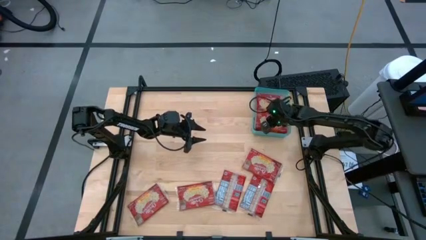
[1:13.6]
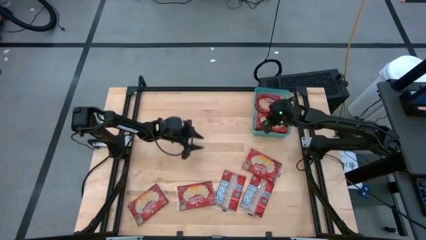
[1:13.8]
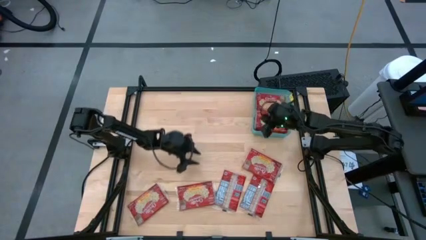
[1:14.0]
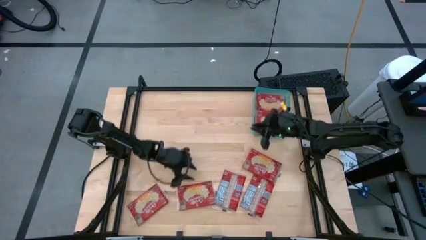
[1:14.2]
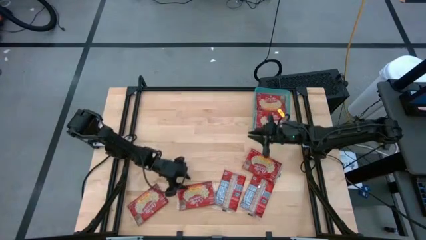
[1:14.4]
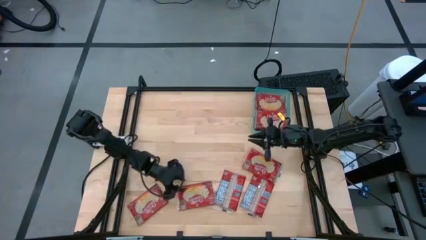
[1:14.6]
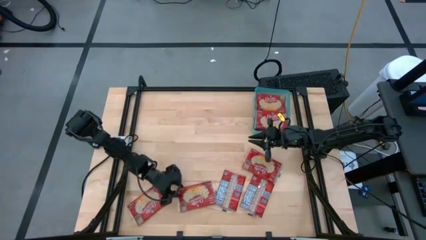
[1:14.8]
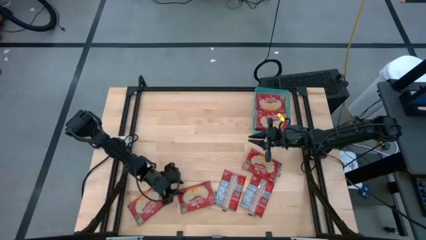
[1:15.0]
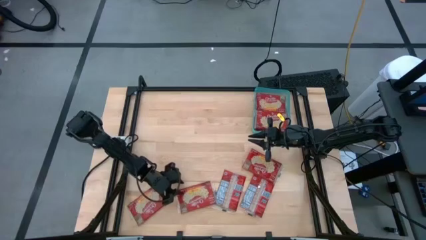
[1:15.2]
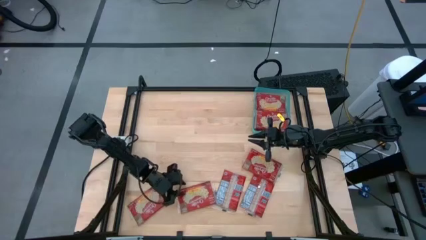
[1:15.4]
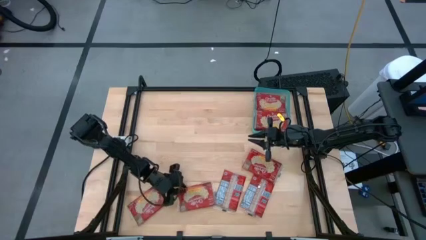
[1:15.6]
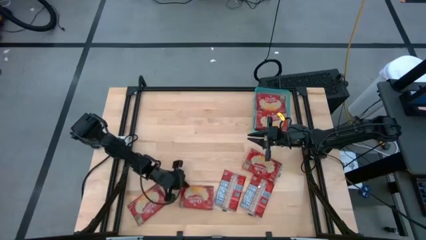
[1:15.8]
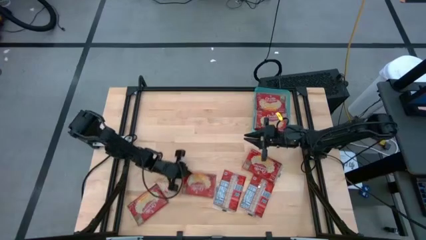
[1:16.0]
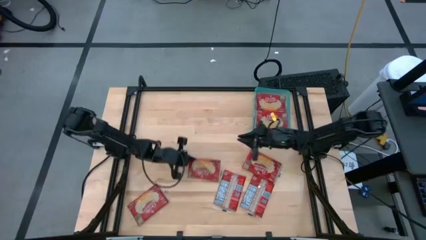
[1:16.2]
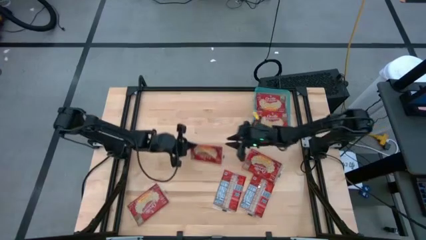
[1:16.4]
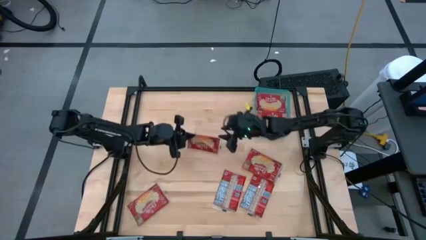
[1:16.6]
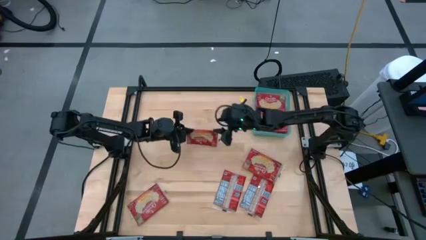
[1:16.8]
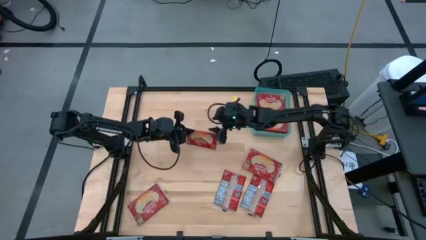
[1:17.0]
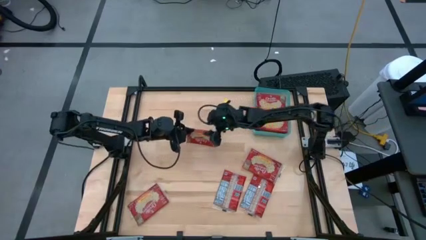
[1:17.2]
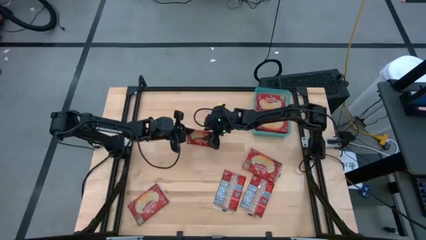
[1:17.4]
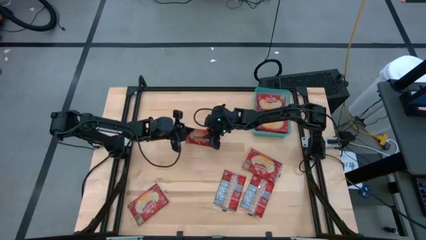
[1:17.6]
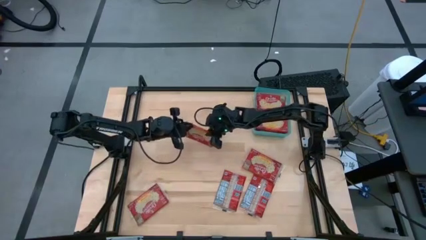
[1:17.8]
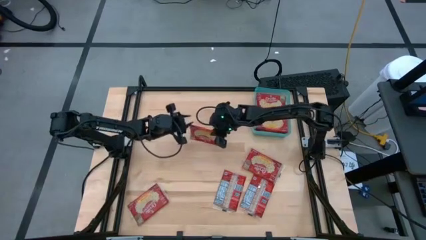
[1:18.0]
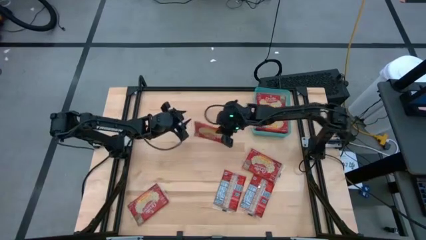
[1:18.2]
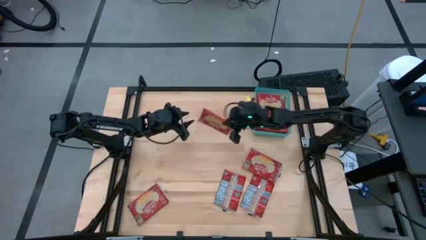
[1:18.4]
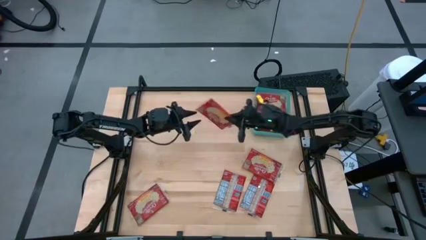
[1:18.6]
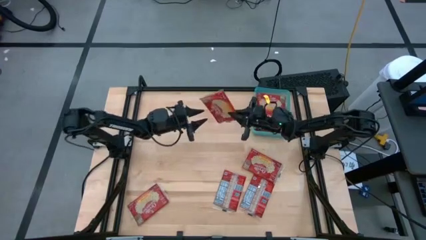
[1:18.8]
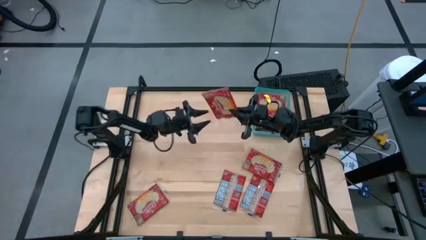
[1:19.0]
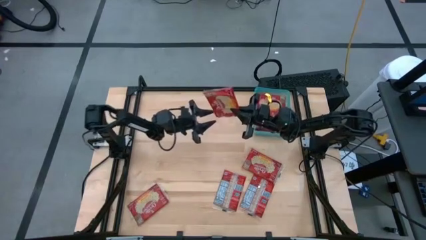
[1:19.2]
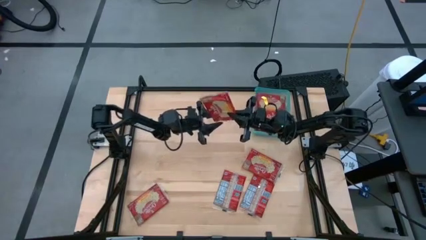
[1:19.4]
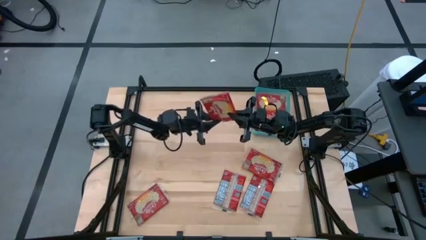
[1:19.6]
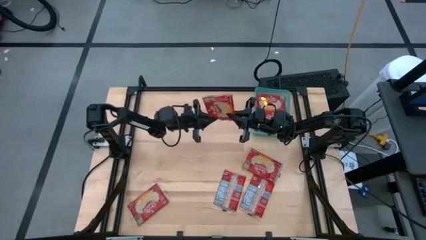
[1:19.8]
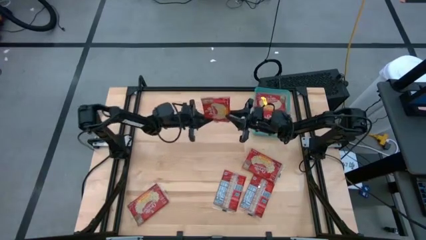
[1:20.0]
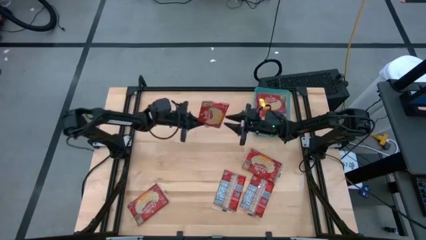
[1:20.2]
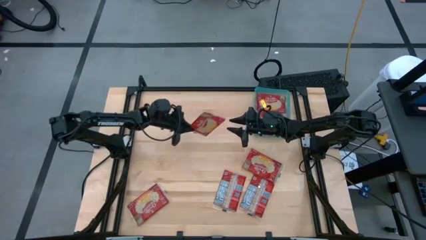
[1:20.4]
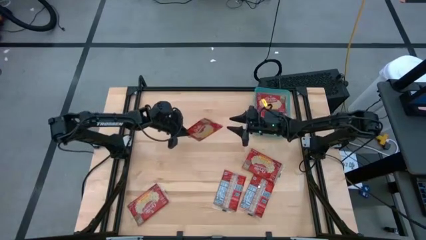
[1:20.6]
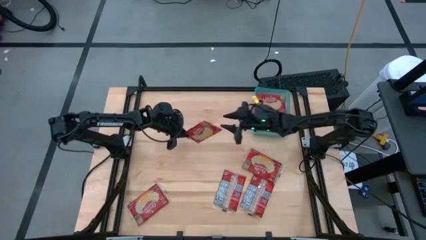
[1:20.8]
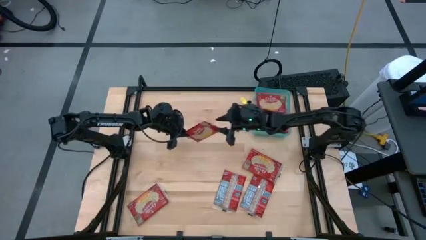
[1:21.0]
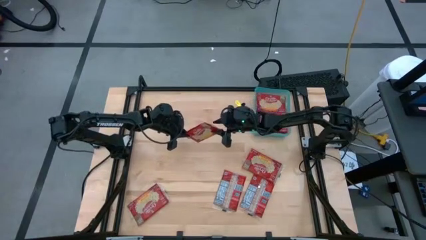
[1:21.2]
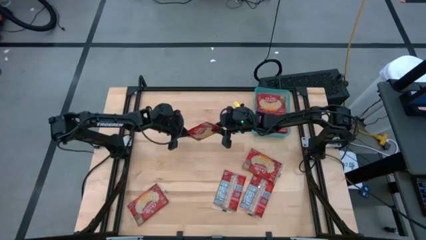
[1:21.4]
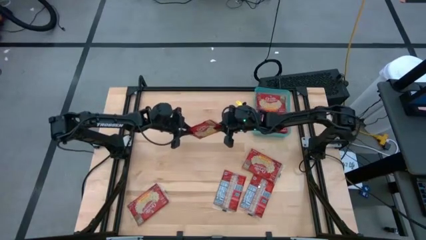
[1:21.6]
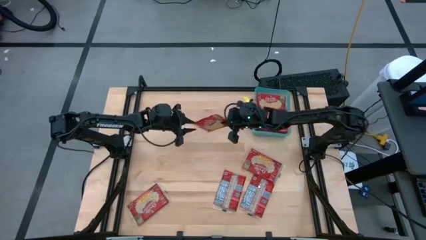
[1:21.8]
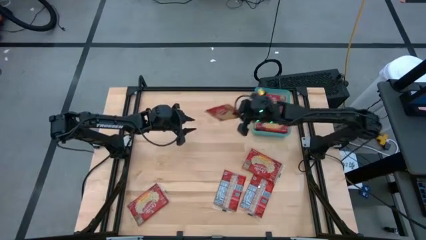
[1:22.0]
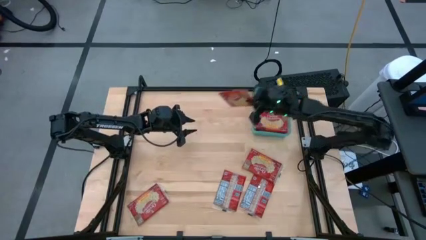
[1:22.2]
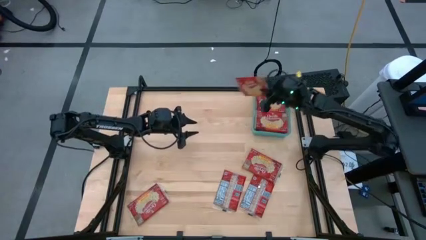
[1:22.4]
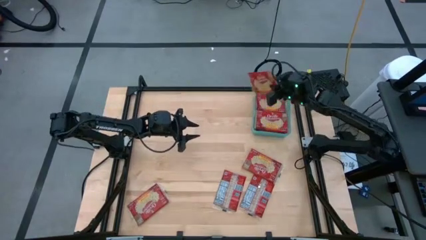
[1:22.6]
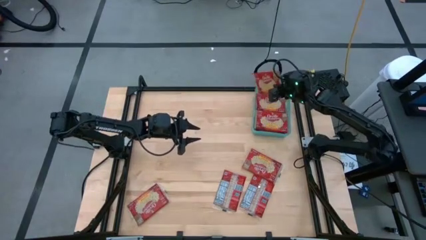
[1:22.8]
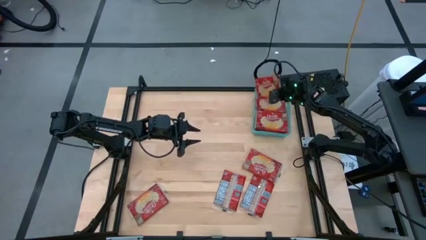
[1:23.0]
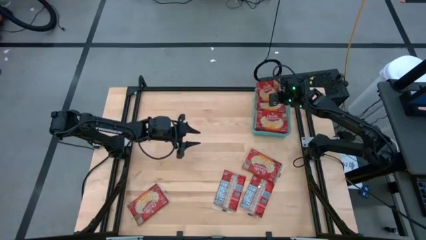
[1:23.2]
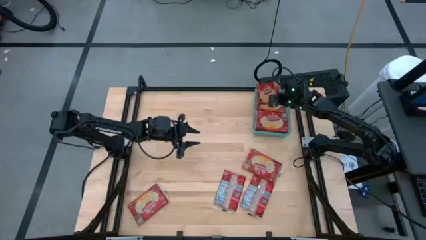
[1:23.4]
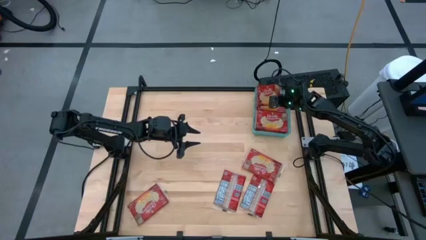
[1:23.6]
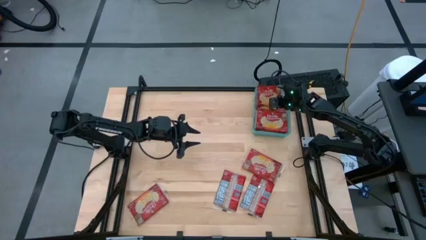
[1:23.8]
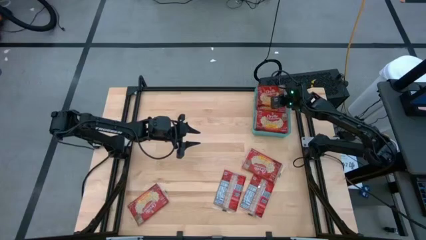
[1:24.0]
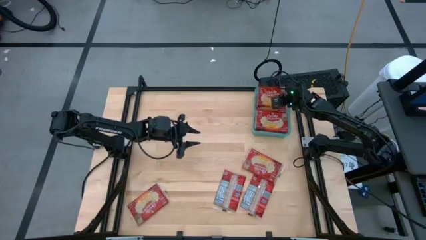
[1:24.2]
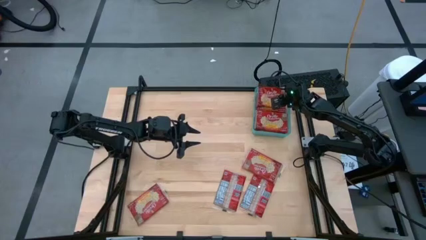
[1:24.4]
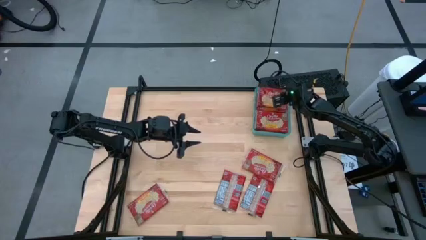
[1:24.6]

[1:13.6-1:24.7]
Task: Sort popcorn bags into baskets
Put the red popcorn bag into the green bin

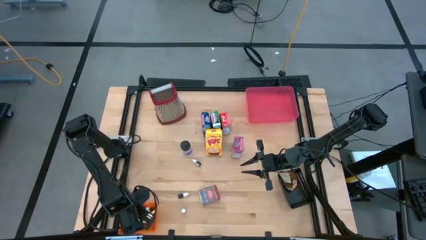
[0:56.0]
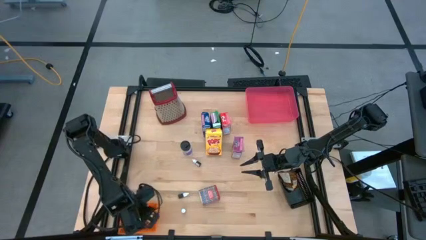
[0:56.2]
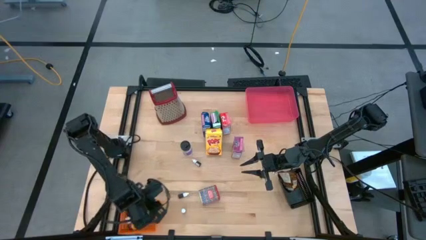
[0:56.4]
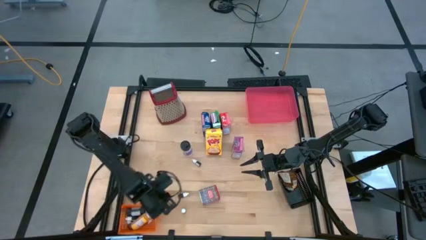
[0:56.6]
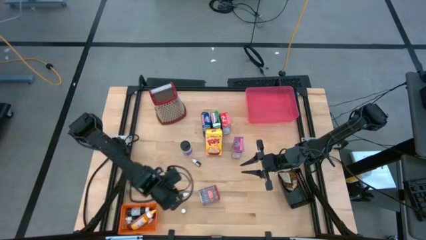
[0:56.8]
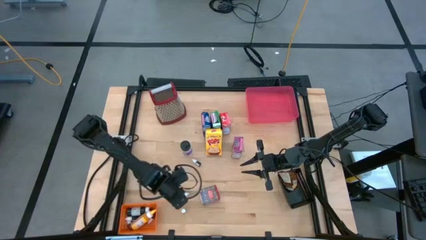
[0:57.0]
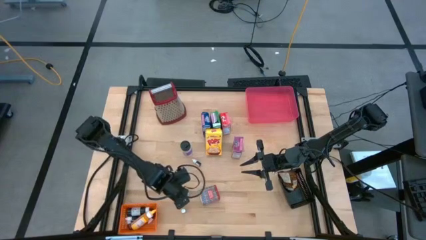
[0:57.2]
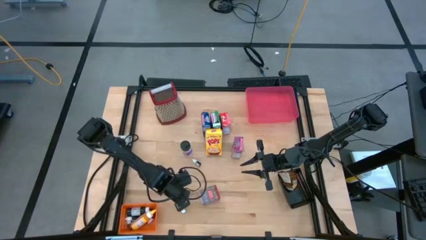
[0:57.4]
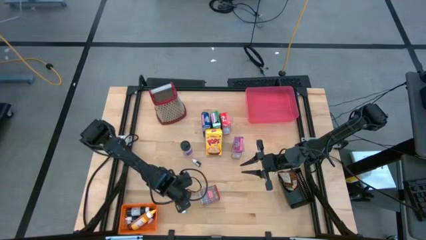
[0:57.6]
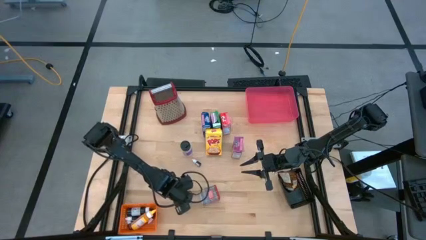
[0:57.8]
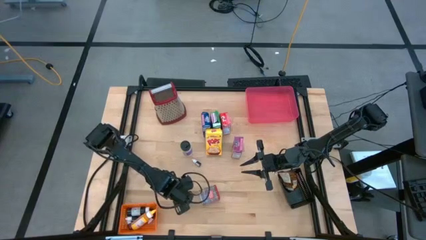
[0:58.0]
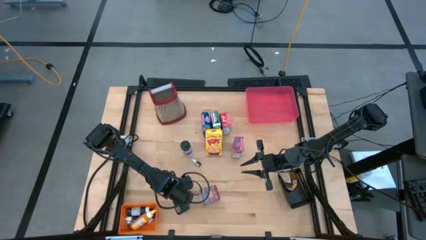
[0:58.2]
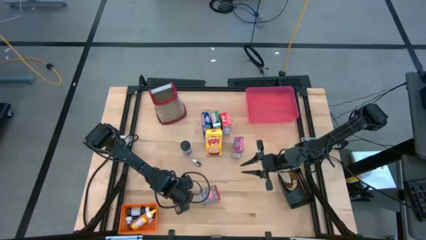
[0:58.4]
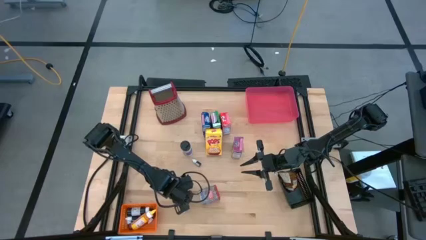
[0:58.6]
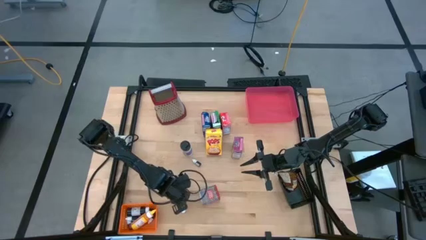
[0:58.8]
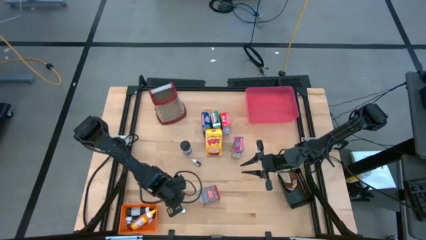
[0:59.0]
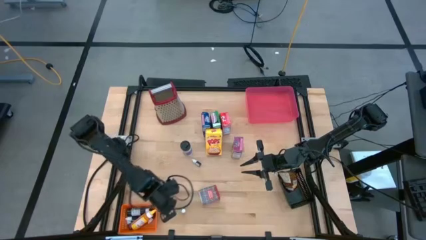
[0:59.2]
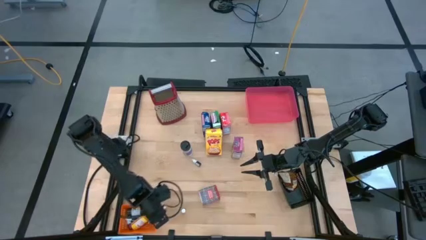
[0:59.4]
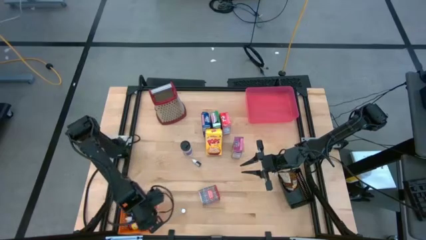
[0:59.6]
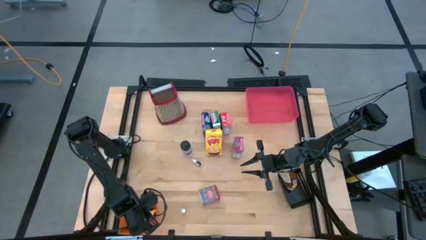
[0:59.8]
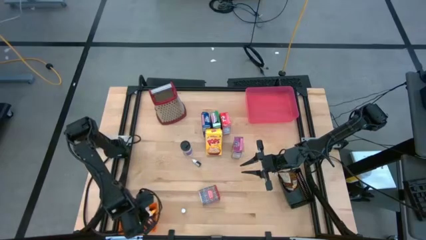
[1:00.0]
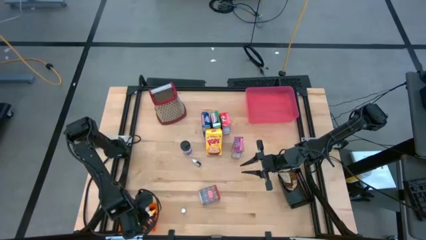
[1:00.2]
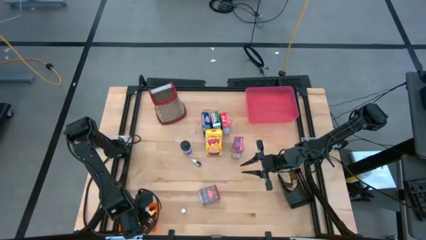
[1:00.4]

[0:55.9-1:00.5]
Task: Pick & Place Kitchen Items
Put the small black food coloring bottle into the orange bin
